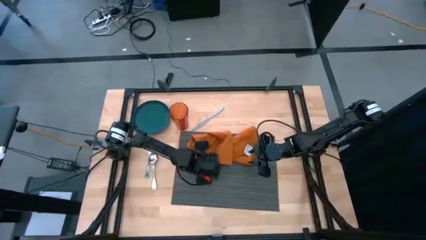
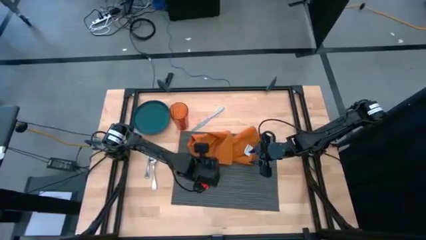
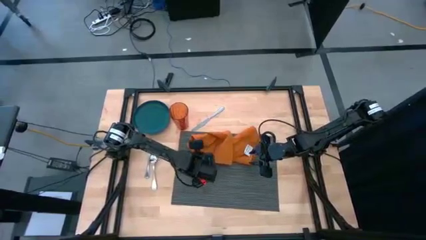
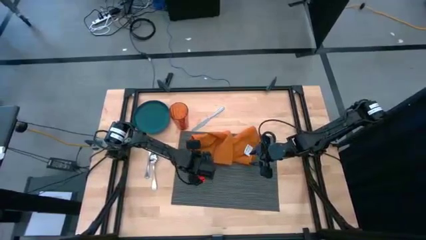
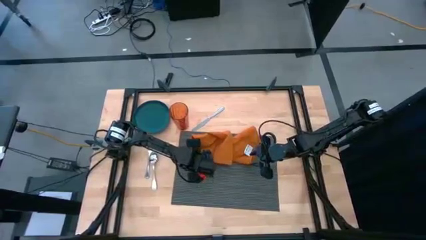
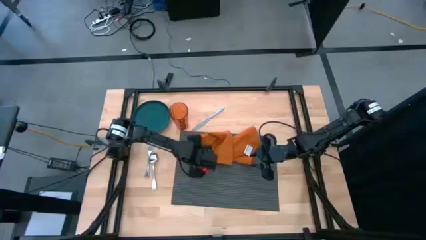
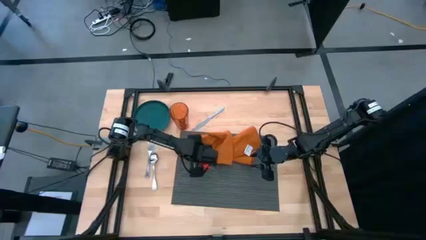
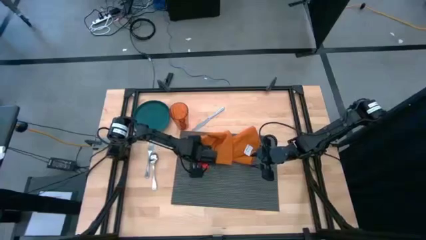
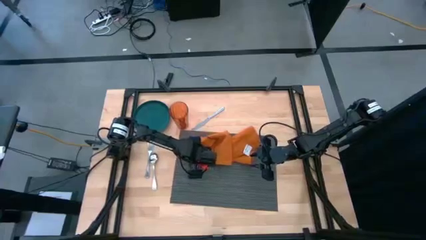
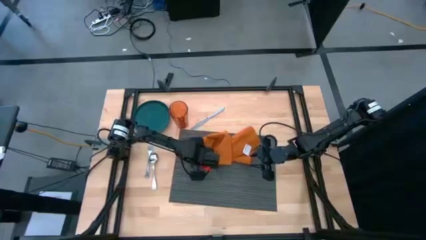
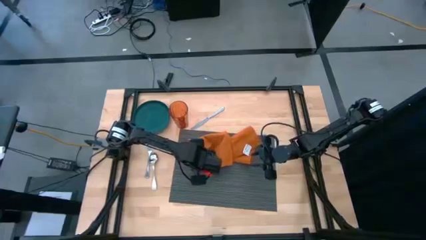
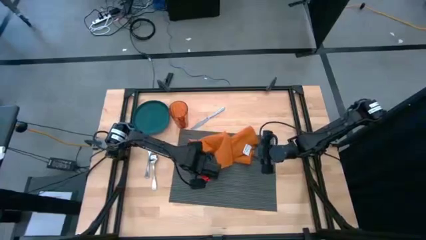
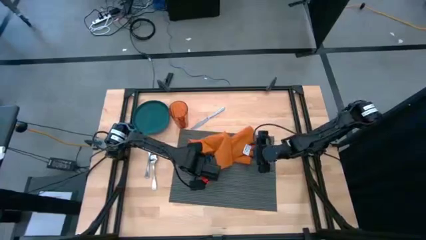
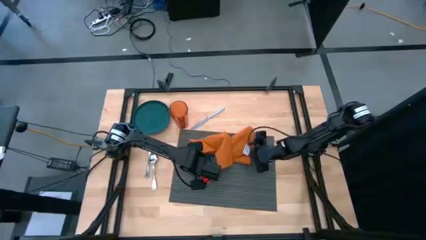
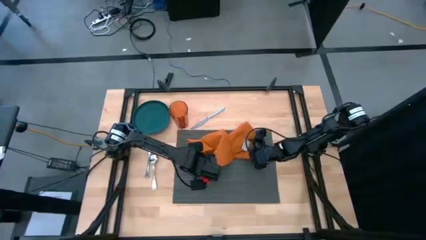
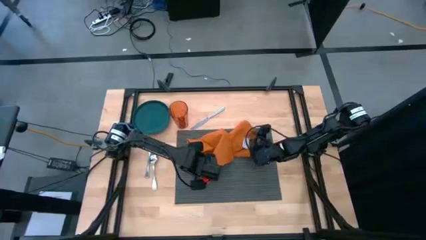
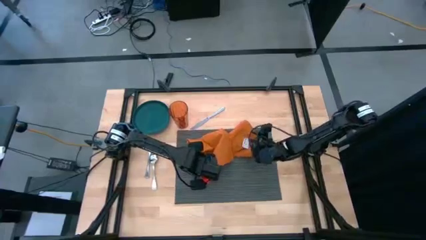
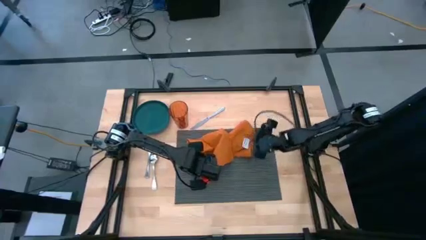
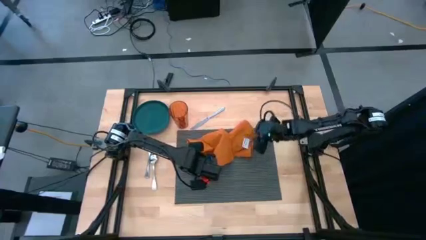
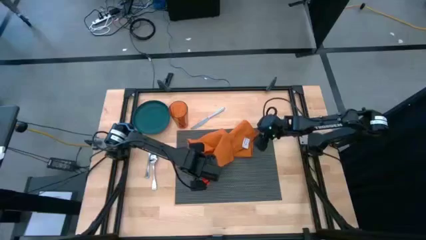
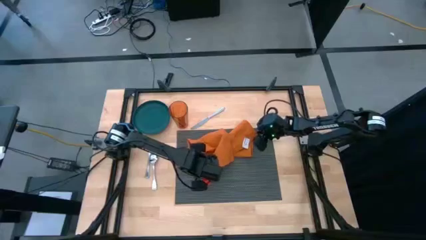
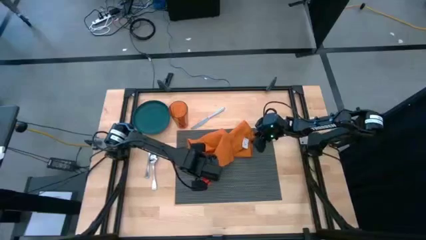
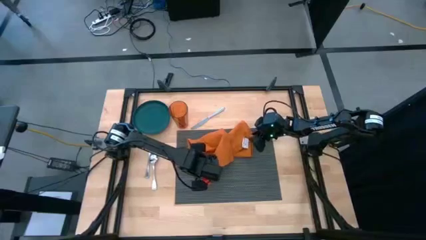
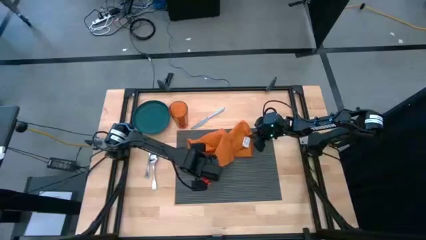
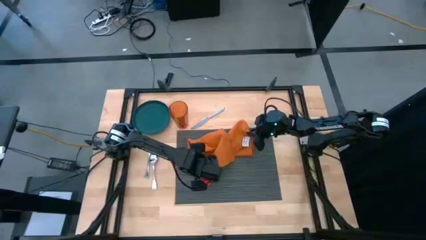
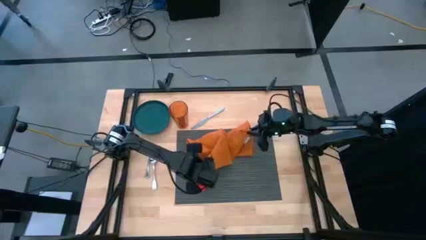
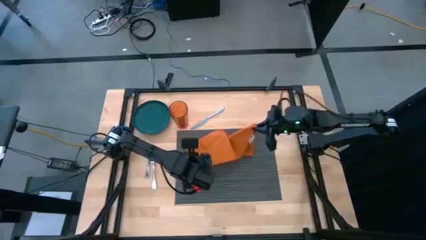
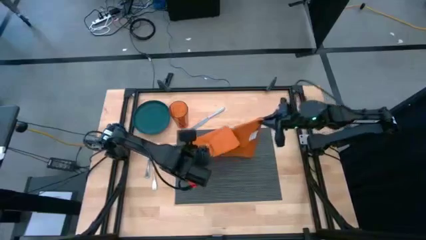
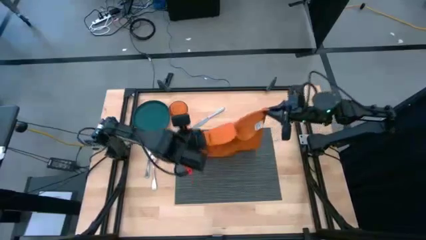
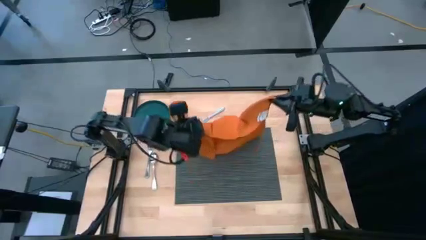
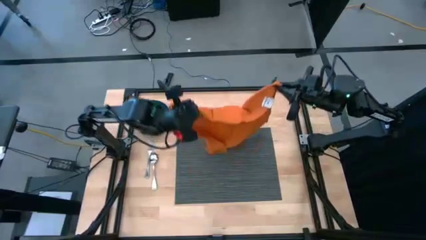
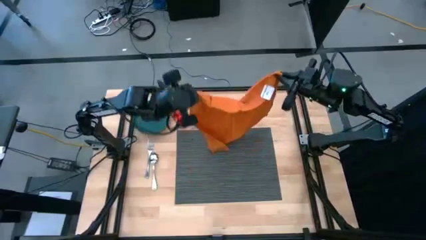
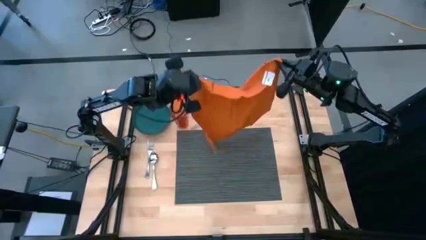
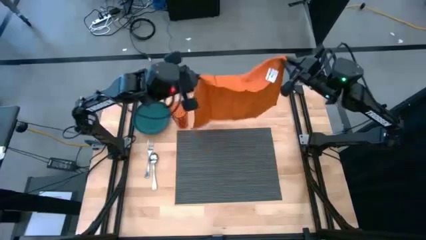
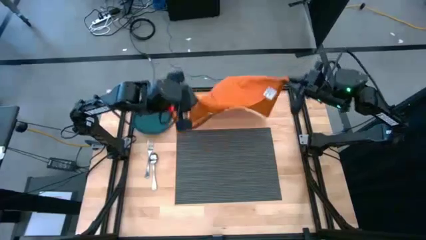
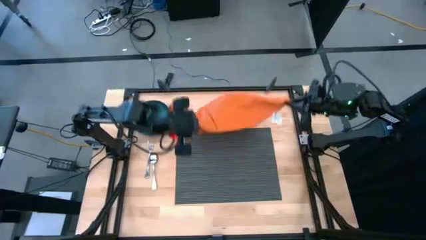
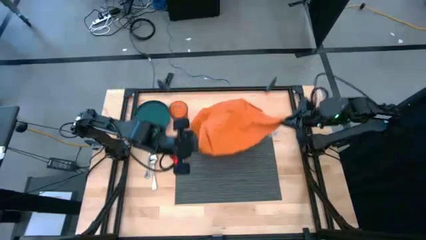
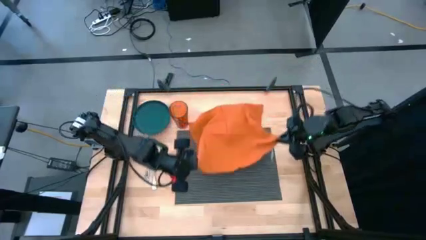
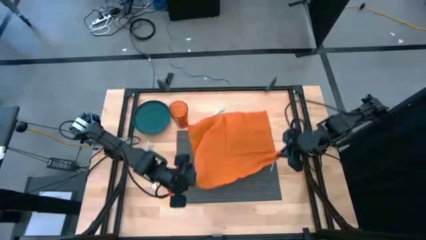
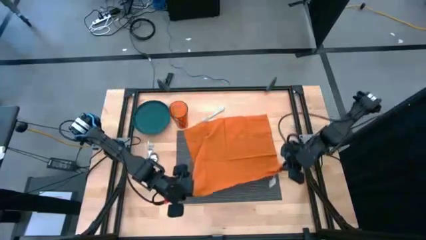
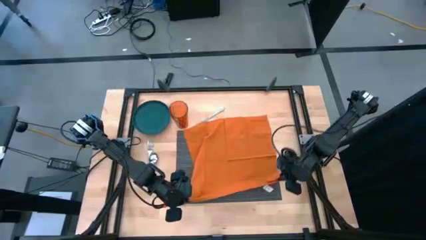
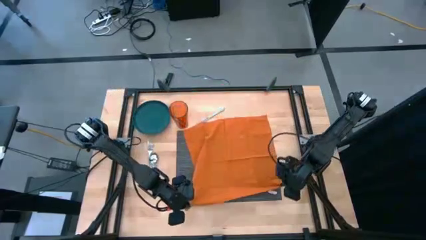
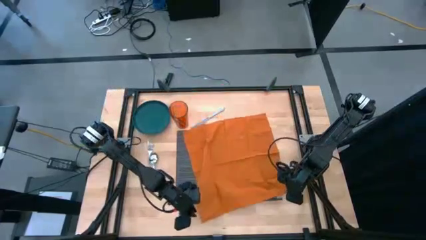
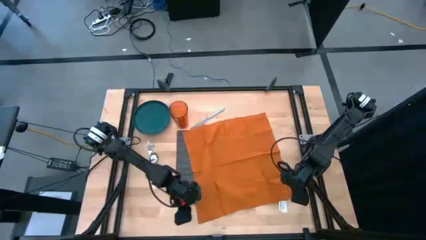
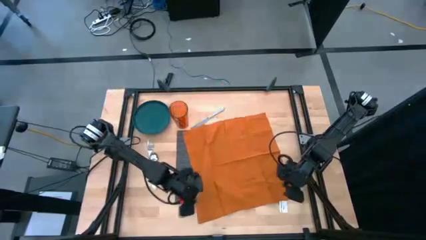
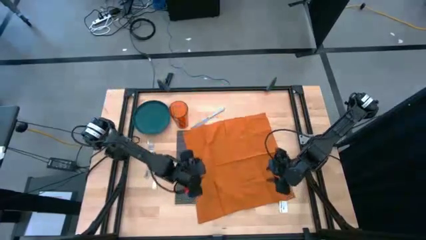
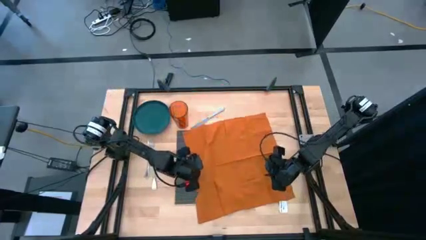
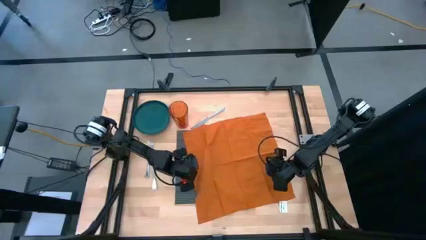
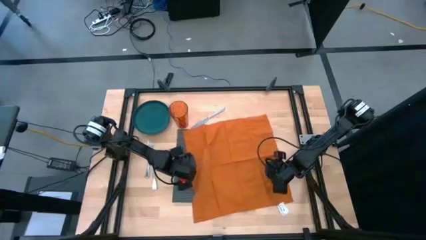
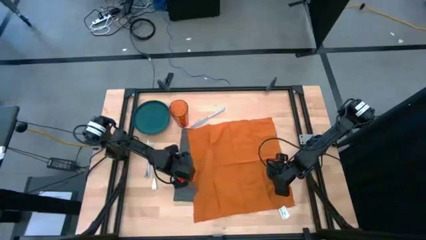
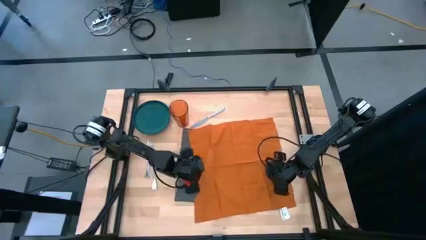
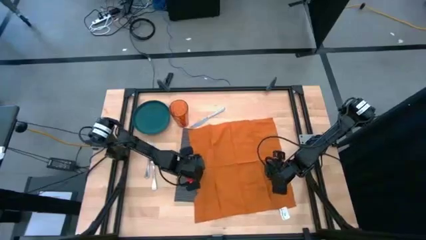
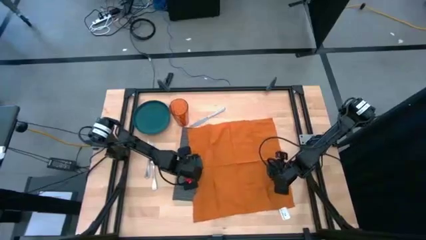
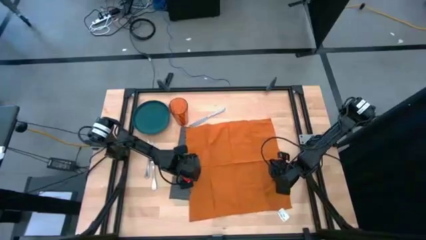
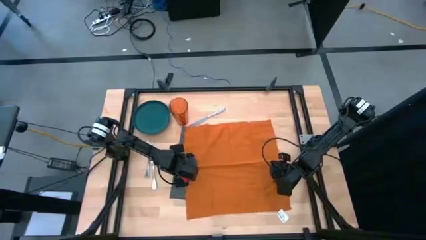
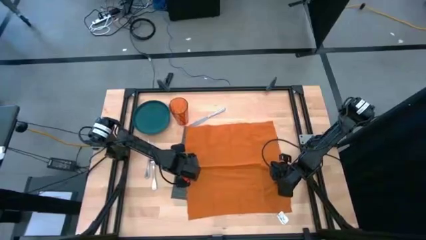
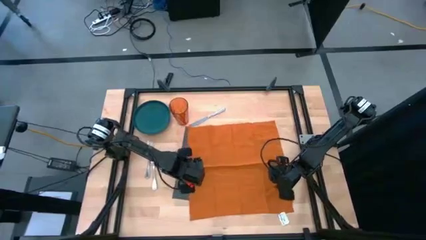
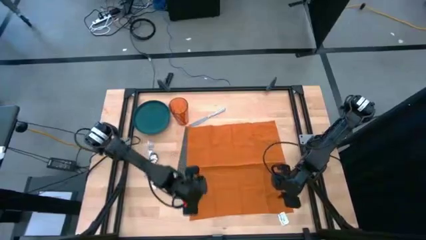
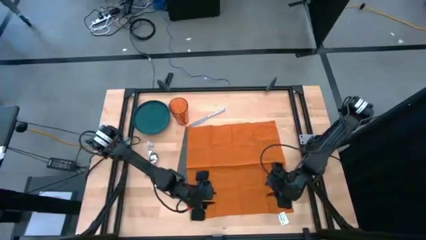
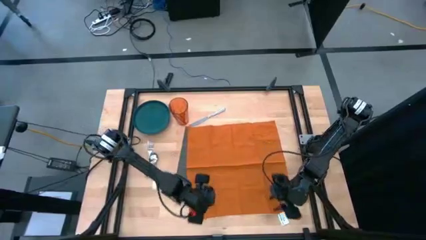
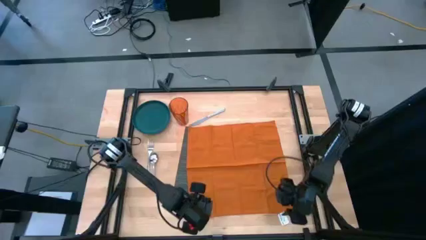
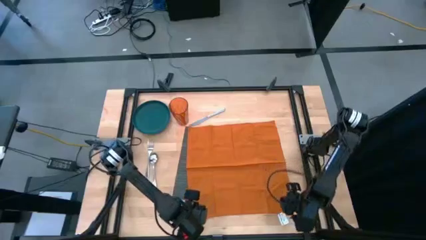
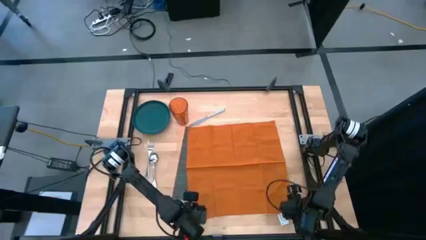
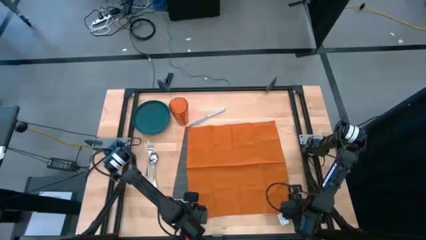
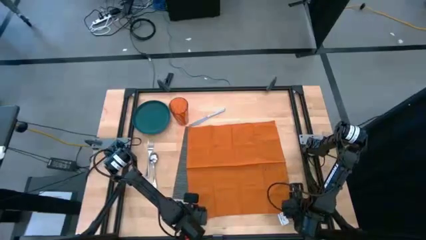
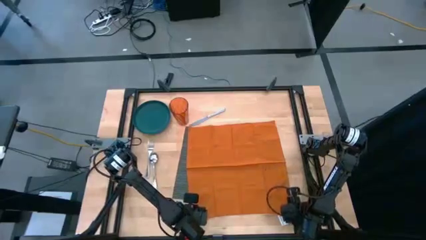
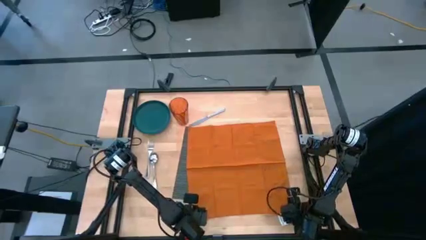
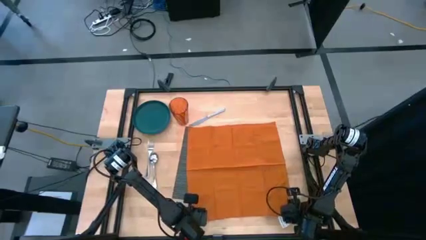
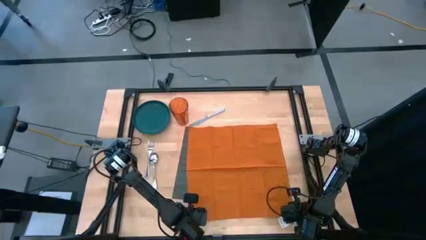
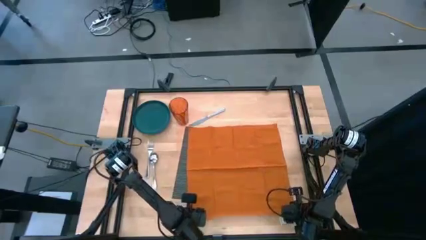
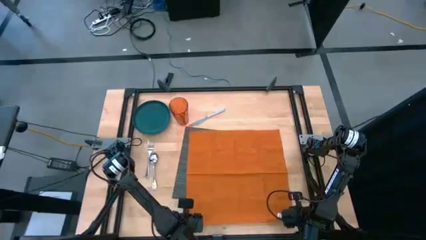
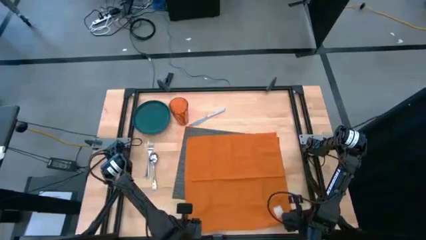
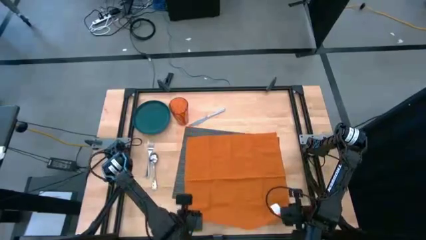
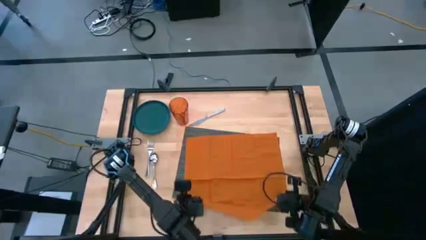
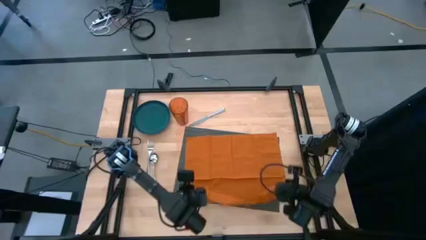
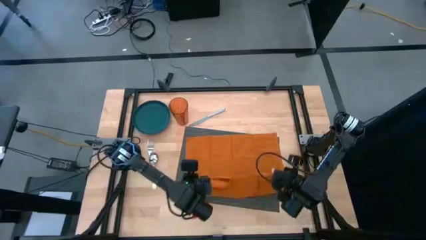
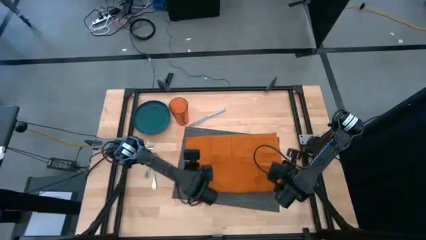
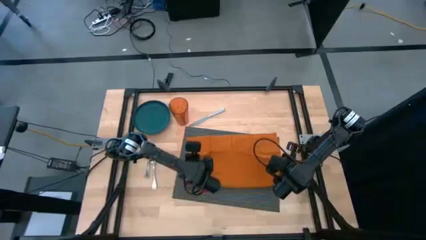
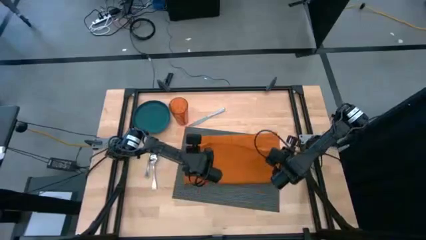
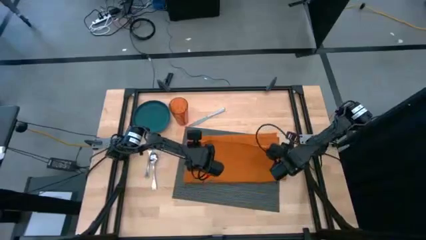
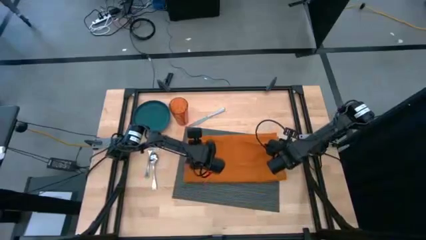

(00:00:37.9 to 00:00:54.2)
Task: Set table place
Fold the orange table napkin on the black placemat
